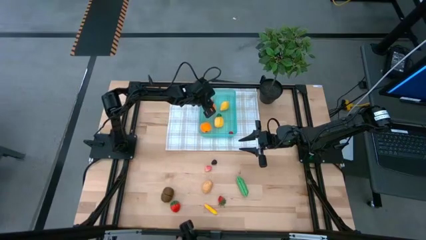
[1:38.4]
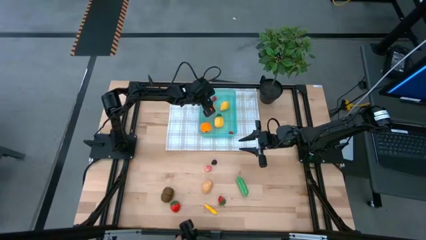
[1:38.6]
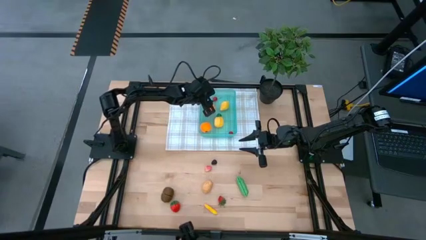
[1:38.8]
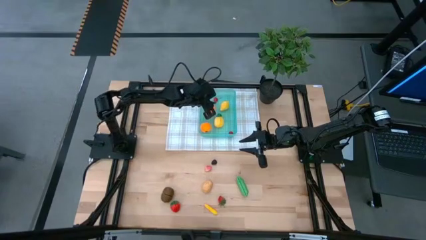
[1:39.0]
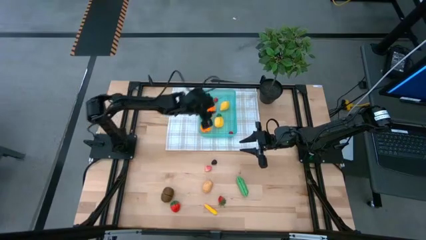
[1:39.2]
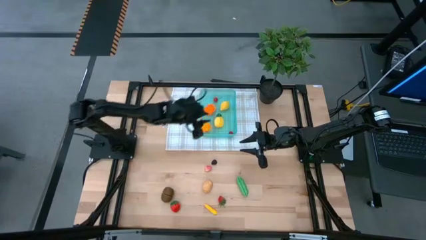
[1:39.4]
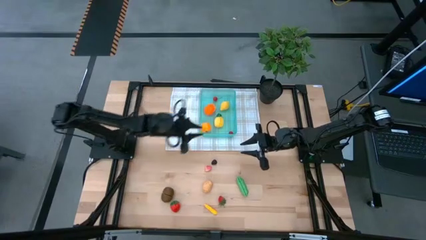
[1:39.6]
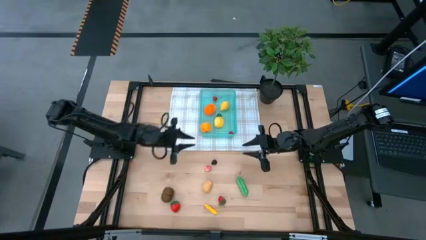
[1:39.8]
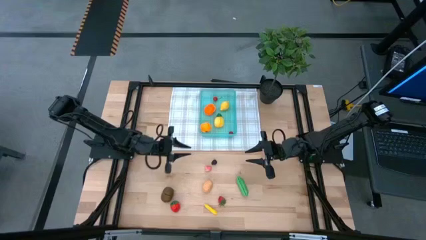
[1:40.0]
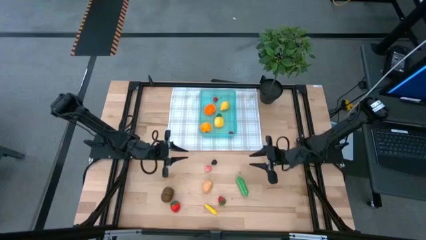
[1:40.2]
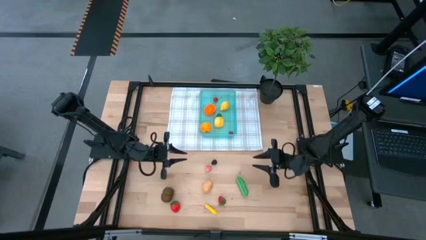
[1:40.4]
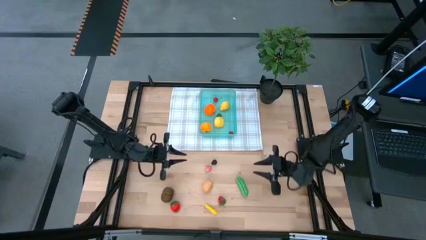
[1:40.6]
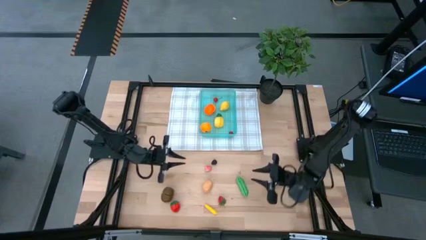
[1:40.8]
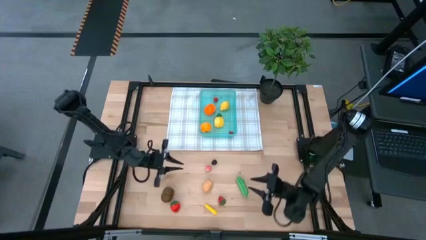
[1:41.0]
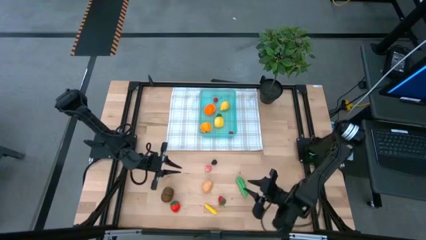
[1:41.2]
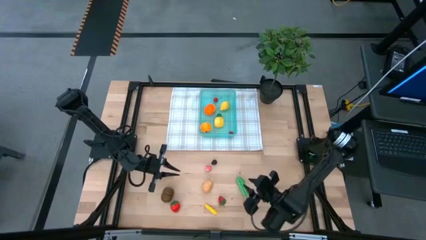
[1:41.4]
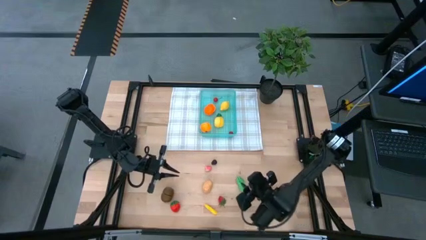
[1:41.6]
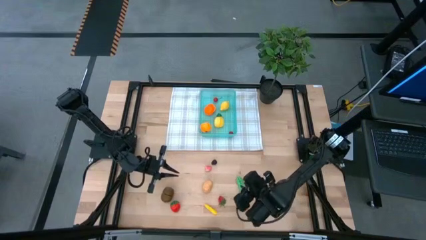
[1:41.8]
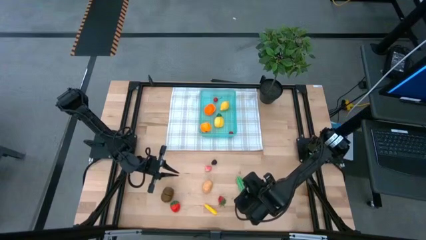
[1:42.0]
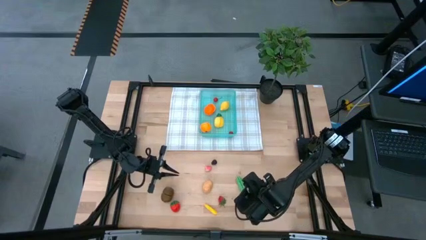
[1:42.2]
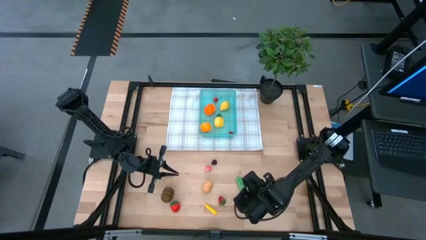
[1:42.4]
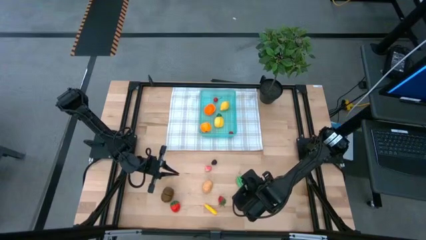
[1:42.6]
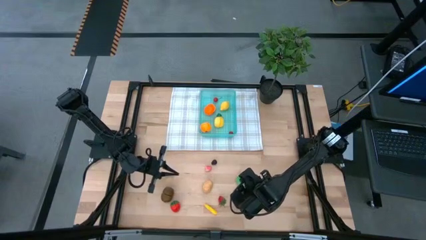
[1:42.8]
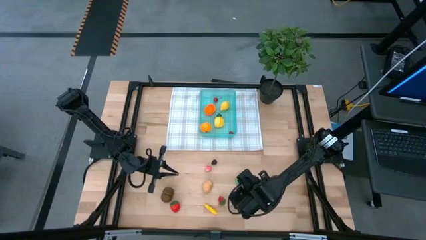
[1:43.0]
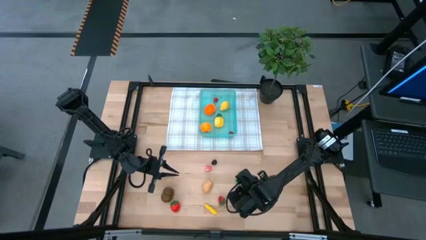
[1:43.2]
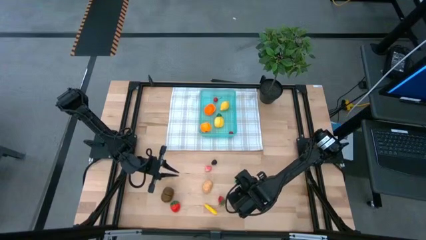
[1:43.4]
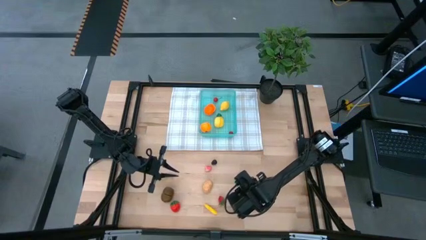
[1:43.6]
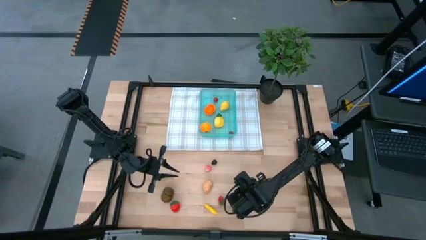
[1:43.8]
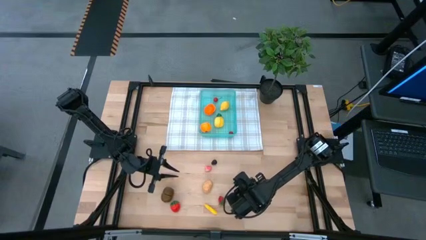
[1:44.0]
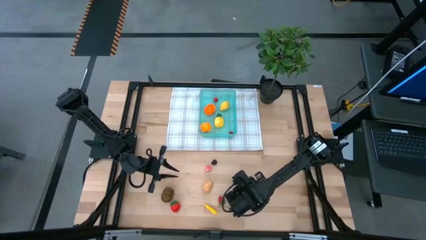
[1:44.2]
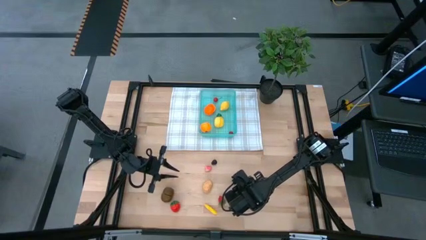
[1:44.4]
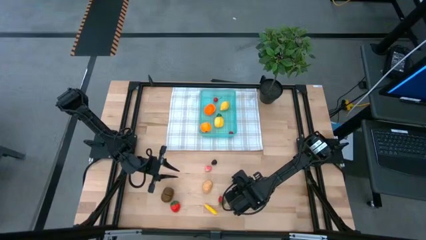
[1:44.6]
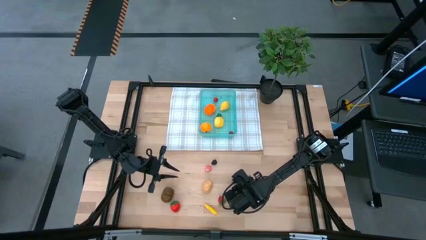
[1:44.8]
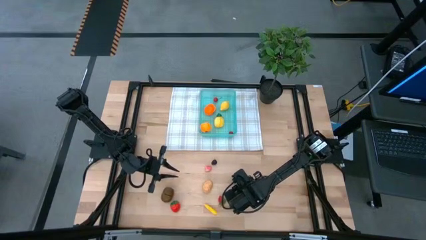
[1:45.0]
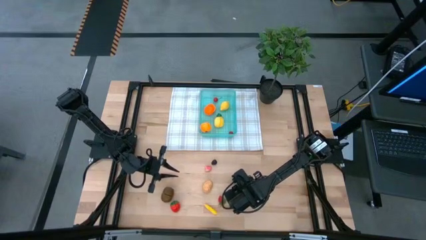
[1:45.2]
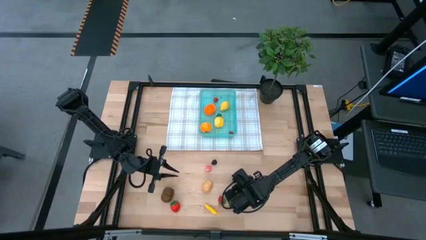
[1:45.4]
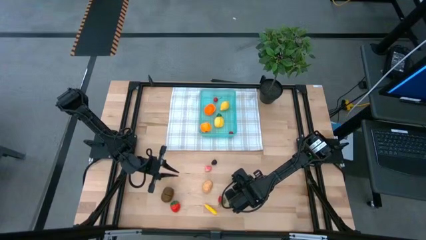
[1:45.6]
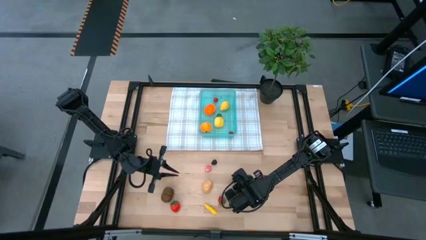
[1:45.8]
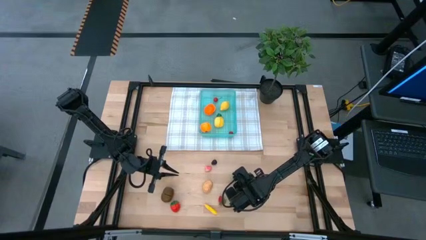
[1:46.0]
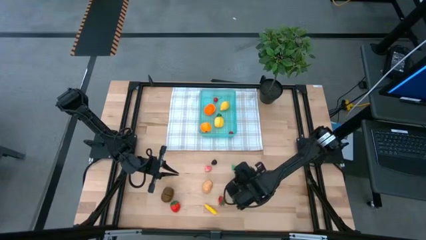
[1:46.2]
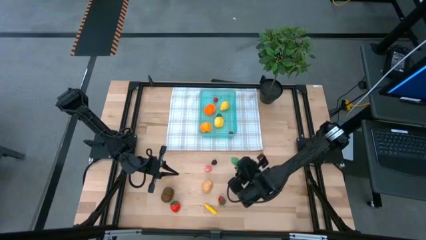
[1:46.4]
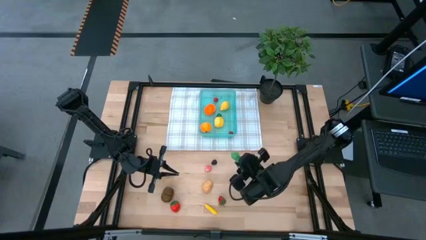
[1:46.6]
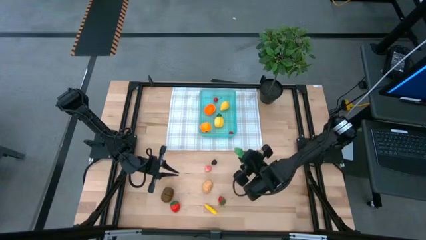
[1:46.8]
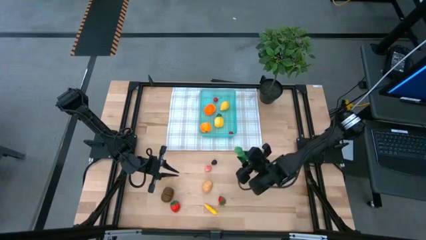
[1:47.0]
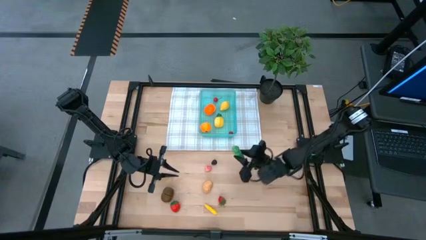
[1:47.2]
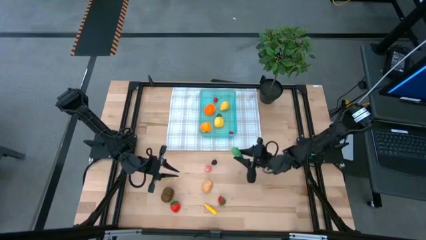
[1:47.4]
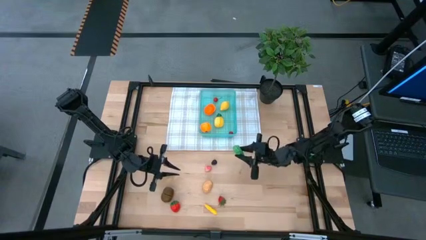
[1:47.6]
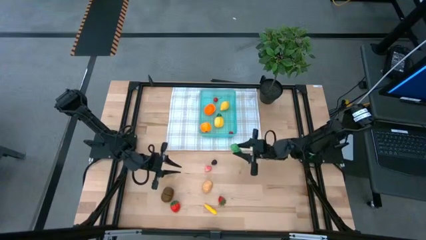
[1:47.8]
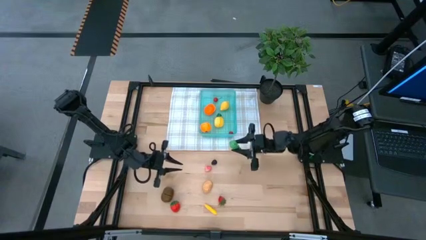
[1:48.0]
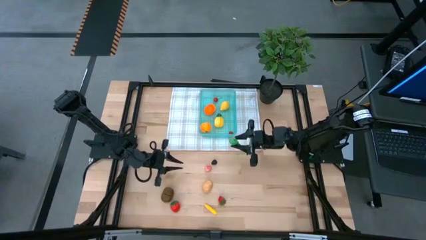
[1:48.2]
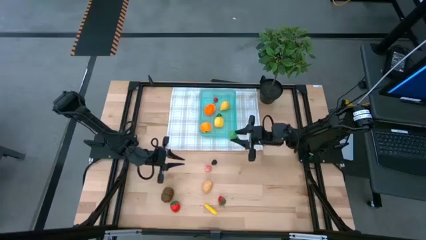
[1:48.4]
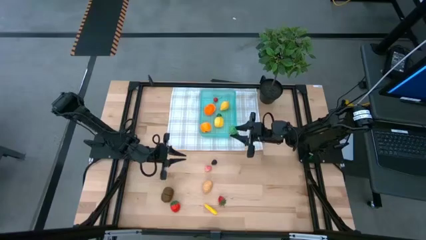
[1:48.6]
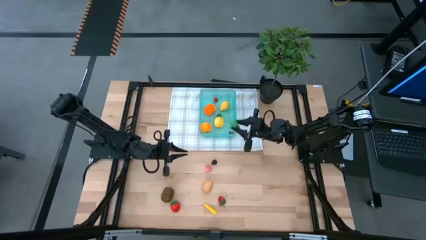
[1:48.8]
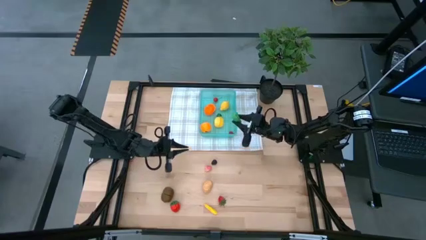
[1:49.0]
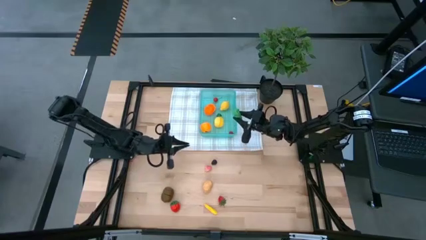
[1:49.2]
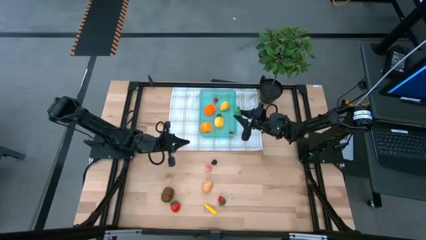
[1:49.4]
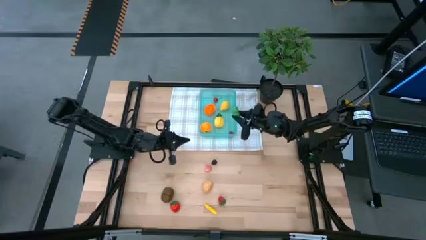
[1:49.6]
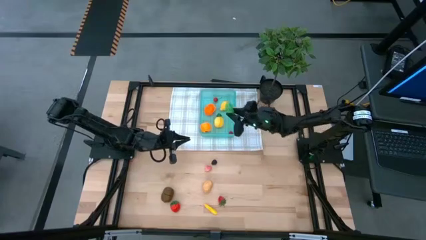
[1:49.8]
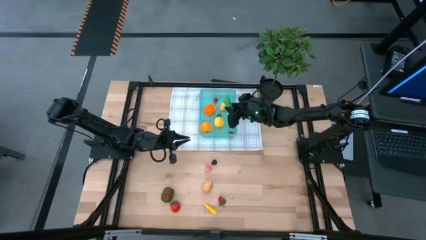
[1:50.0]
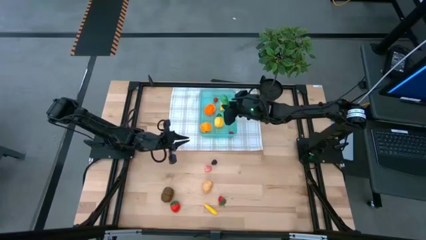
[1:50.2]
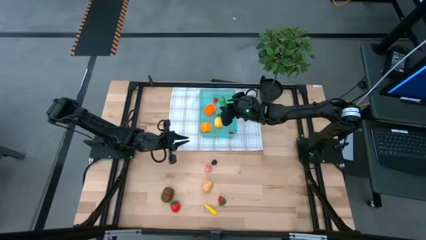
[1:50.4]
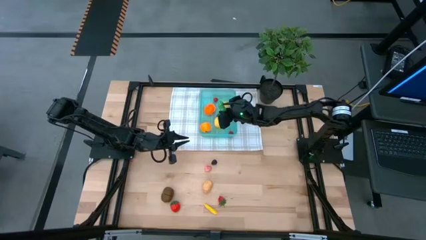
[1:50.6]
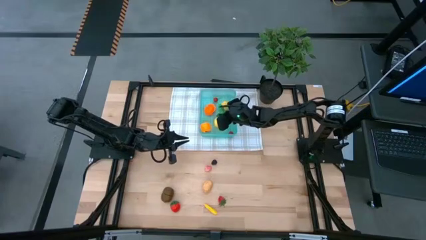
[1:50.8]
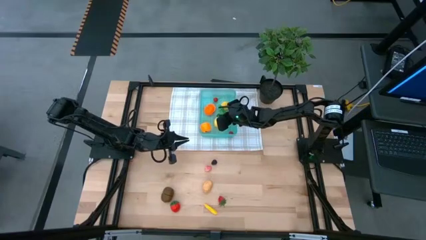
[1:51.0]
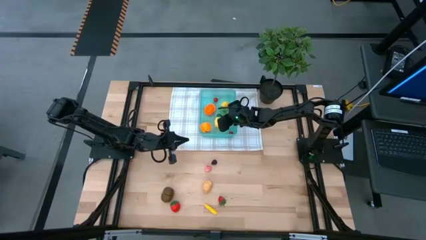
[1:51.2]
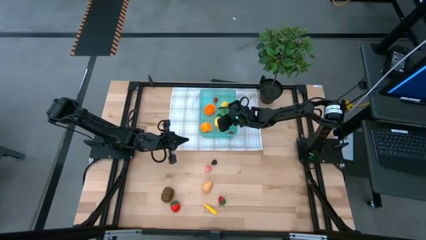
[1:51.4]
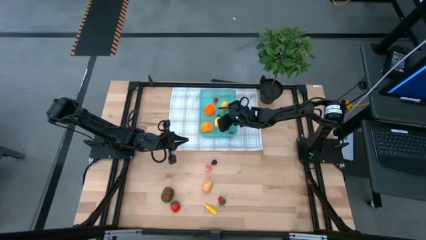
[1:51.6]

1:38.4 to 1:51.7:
Task: Pick and placing Produce into tupperware
Put the green peas into the green bin

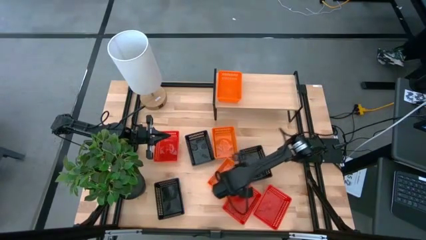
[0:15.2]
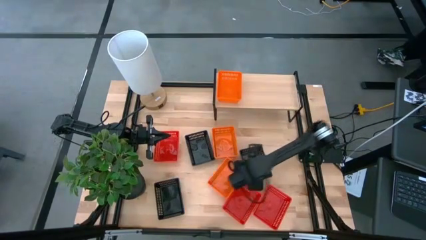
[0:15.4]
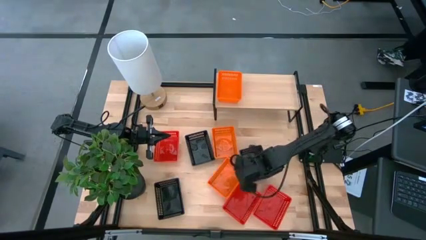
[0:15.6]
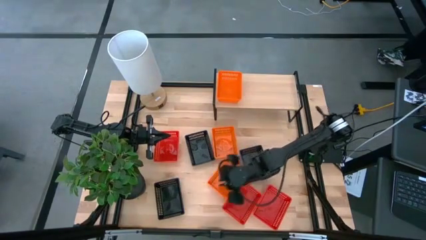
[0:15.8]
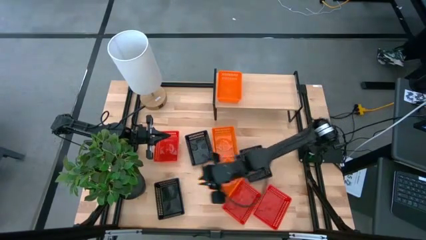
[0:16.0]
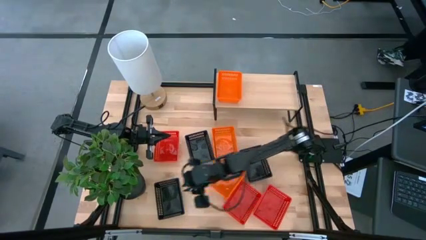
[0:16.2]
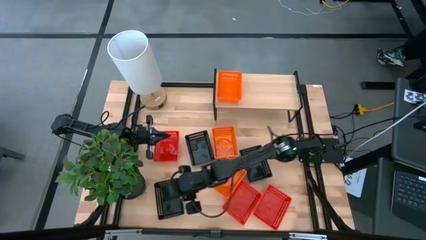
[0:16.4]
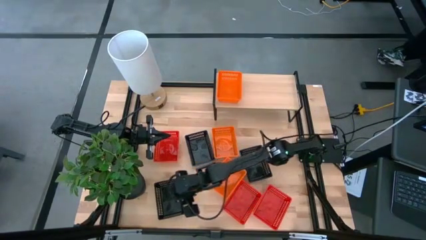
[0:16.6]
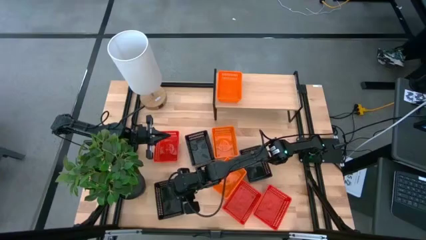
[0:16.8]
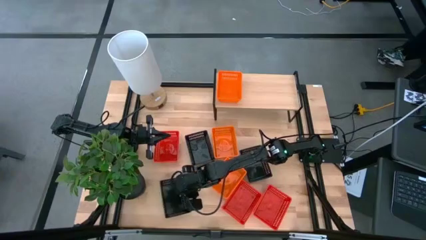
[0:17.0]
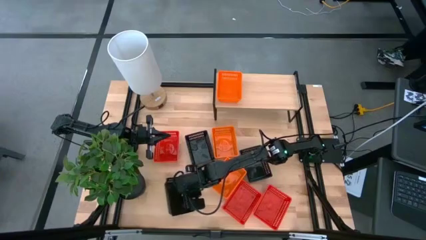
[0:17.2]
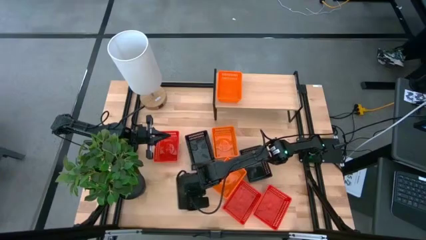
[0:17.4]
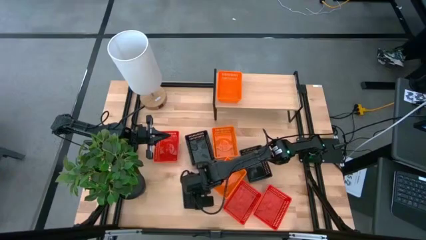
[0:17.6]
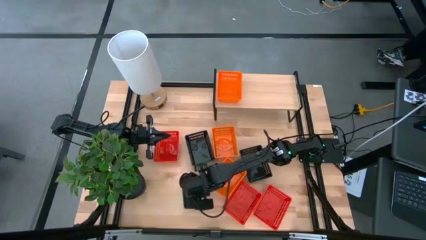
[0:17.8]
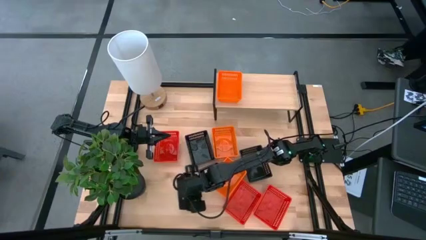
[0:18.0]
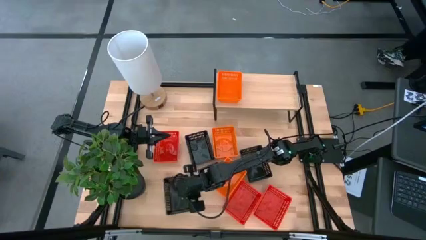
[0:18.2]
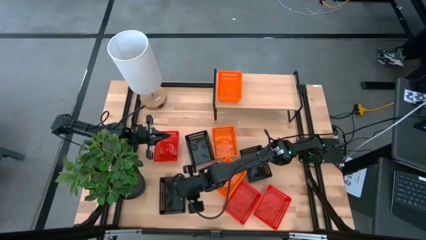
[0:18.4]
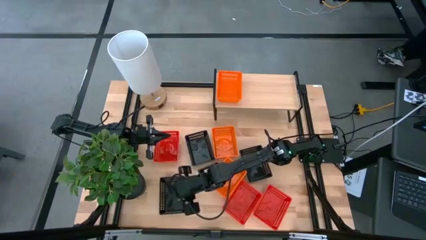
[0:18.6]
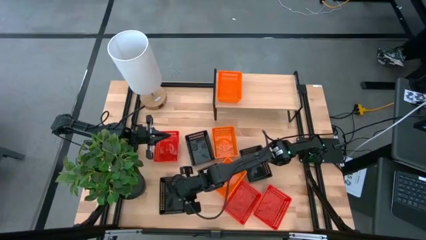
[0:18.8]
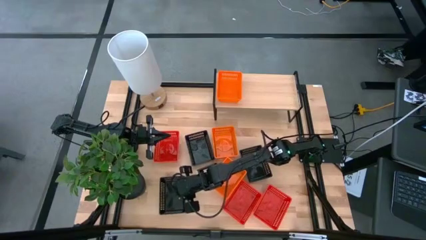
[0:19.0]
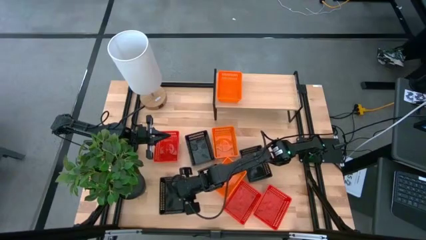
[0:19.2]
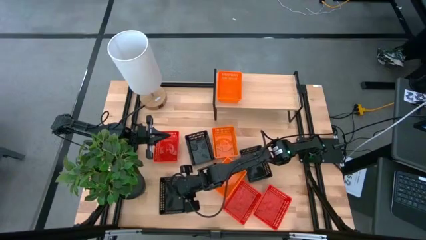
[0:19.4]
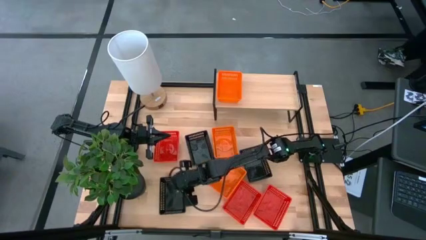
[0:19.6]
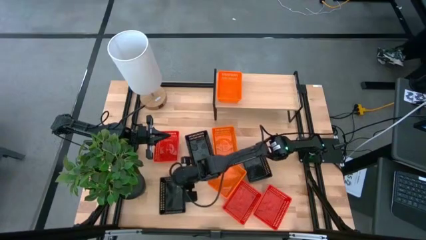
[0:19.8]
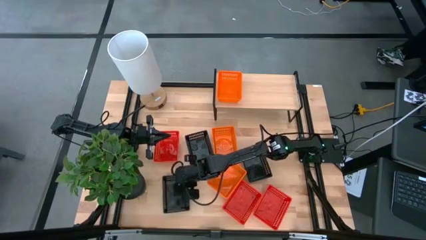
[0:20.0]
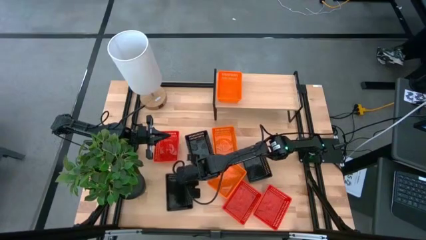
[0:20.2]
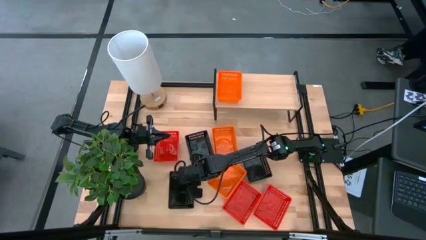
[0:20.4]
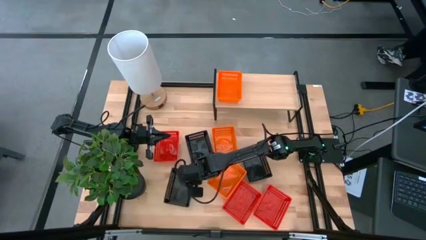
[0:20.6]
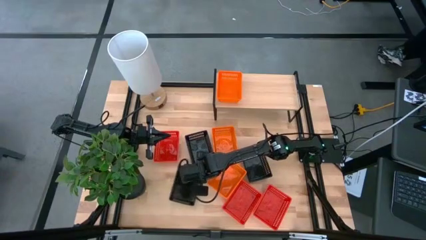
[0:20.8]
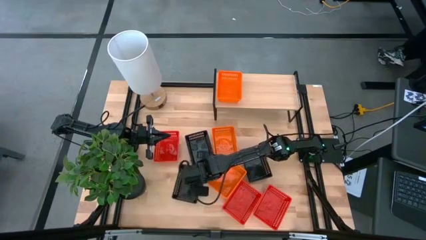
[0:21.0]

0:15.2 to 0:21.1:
Task: Stack baskets on shelf by color
Adjust the bottom black bin on the table
